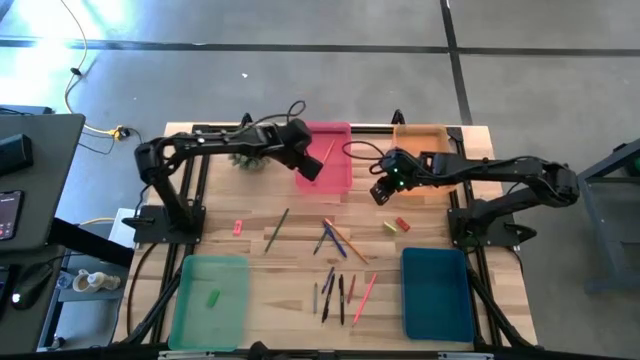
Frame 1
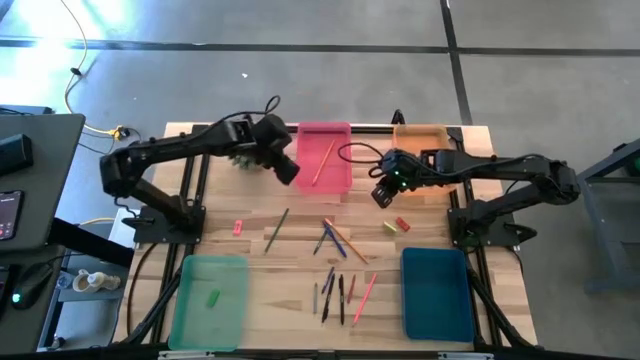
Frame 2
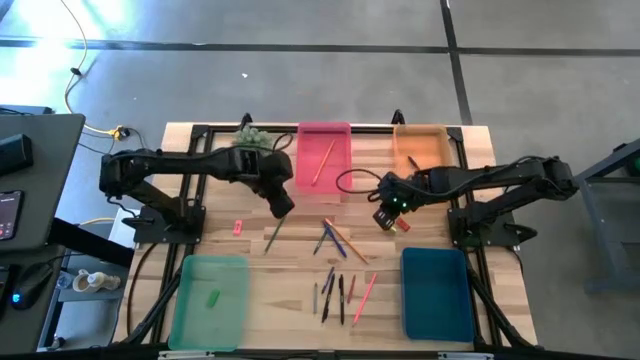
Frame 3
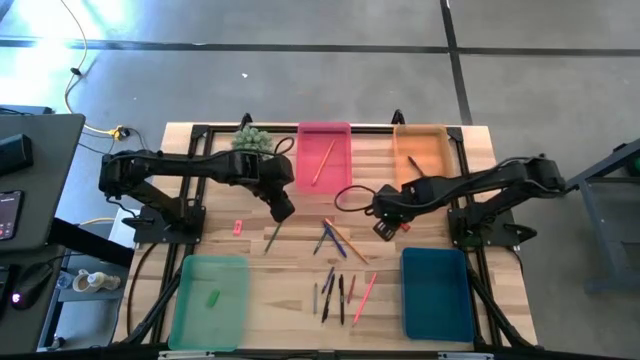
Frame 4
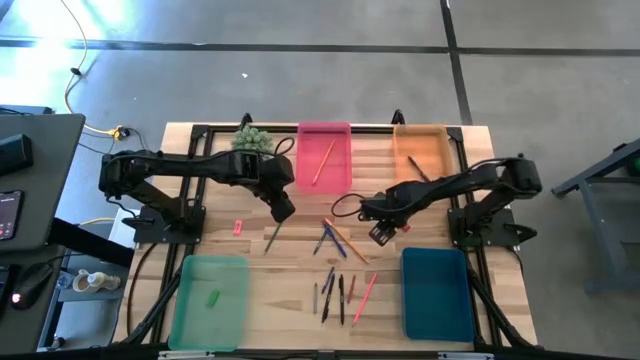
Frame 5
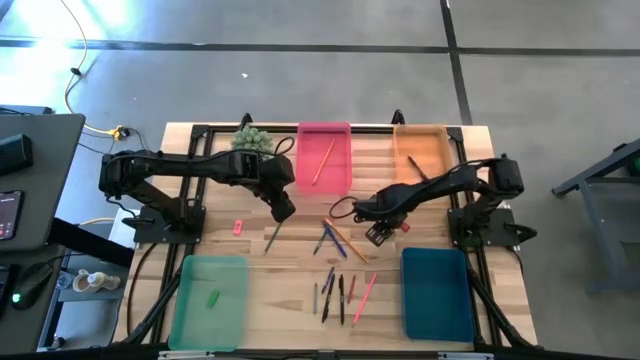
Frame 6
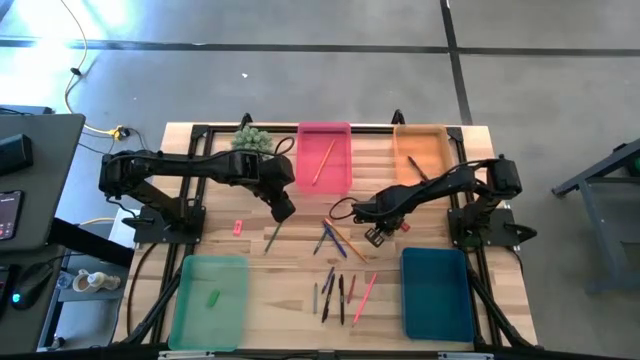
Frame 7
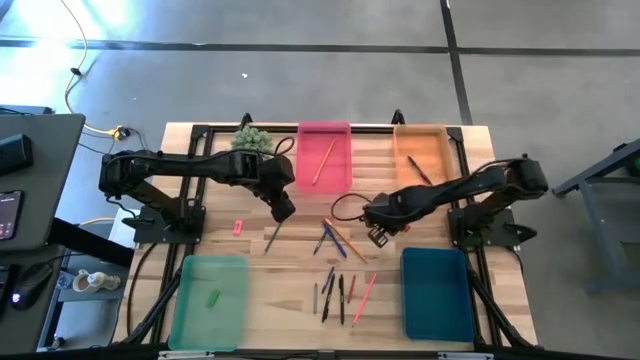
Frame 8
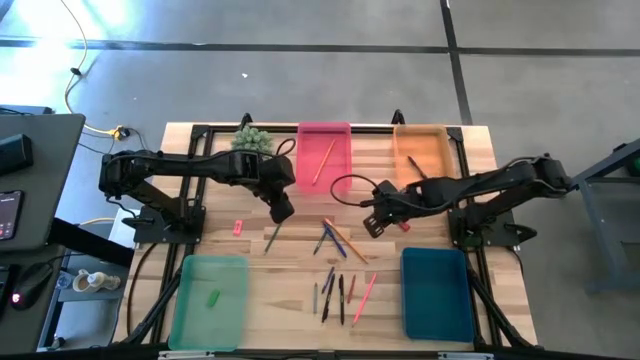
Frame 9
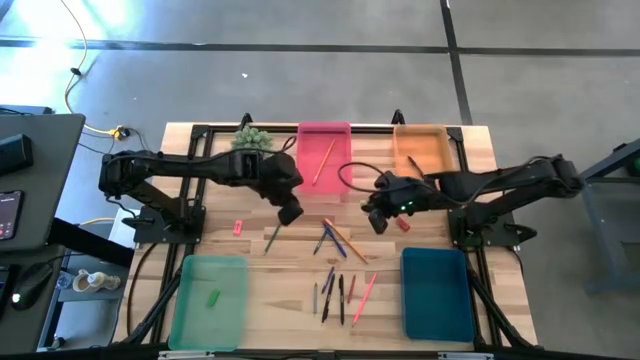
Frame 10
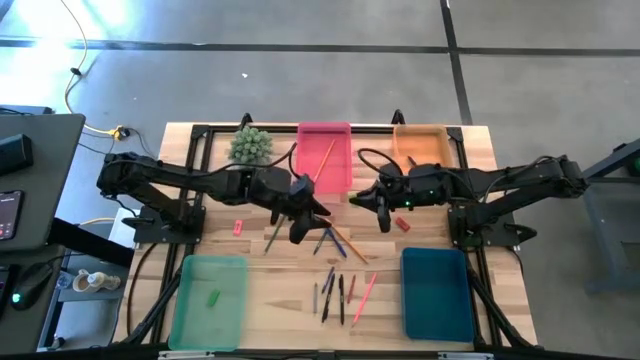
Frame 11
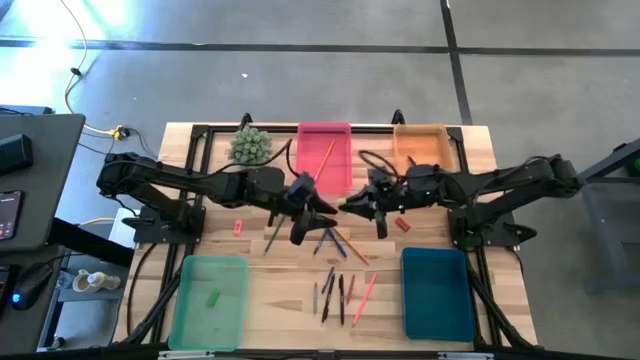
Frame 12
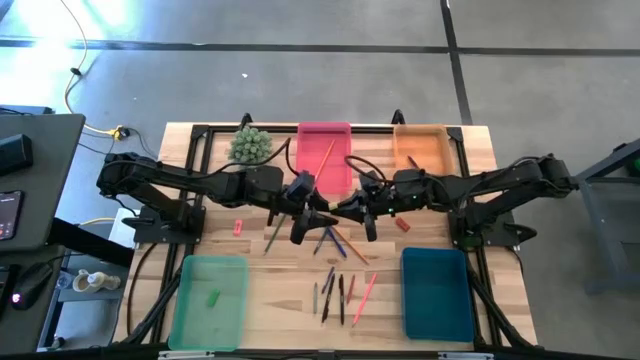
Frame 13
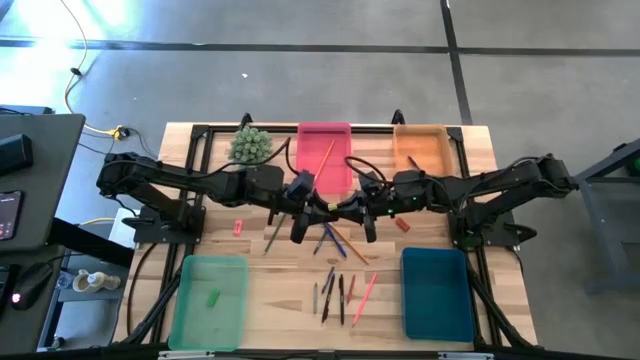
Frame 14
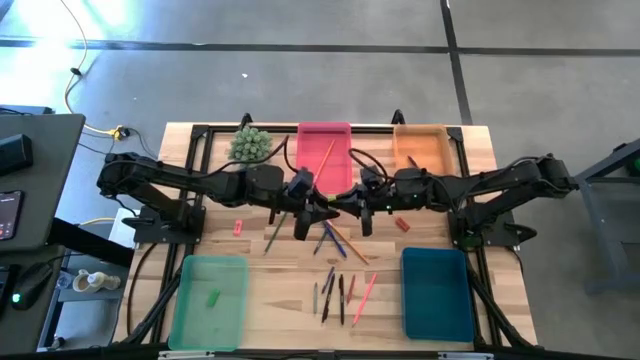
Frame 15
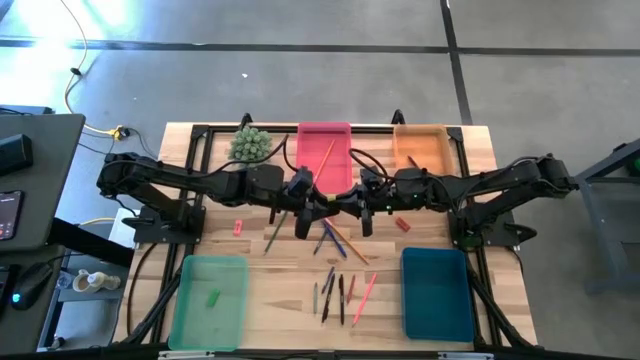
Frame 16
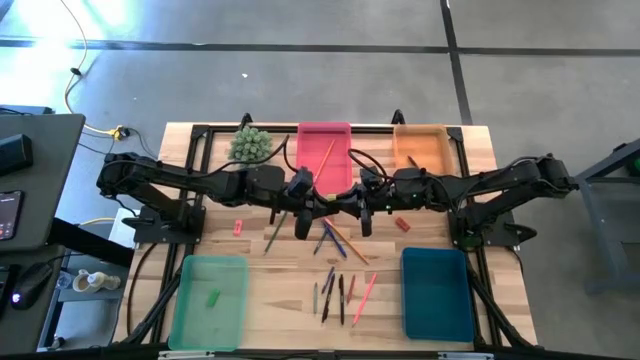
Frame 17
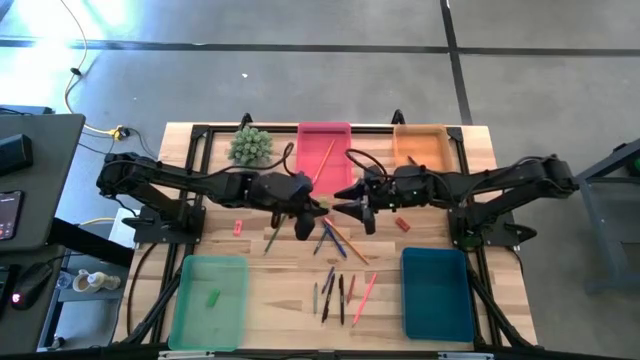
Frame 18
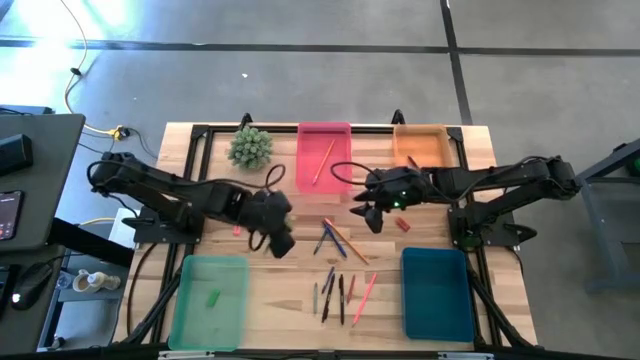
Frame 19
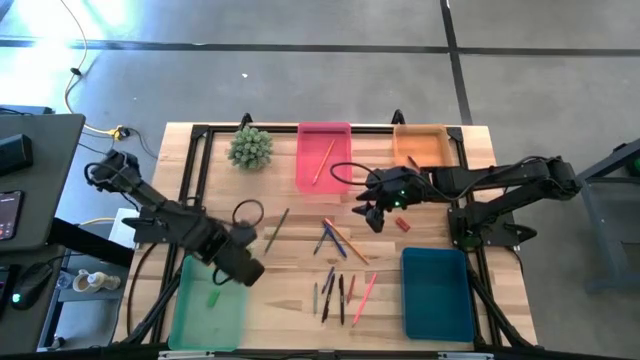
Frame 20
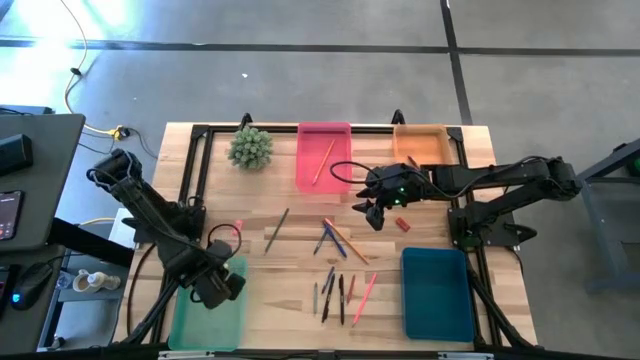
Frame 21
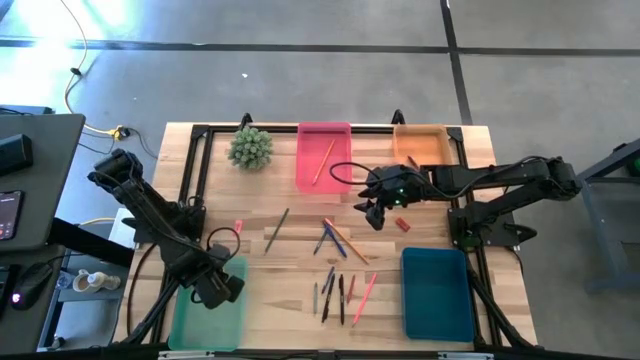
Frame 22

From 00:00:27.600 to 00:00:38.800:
Task: Sort crayons/erasers/pens/pencils in bins
Put the light green eraser into the light green bin

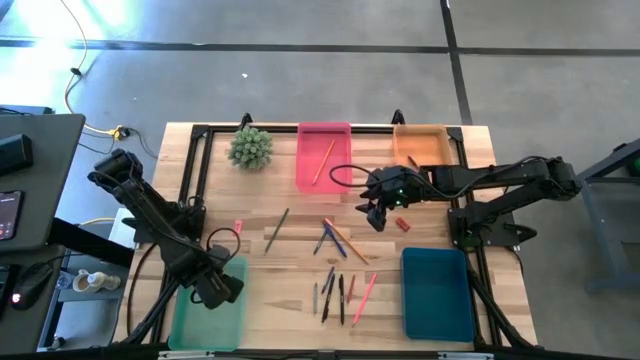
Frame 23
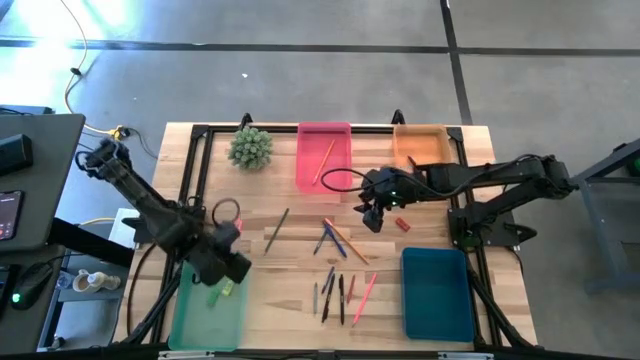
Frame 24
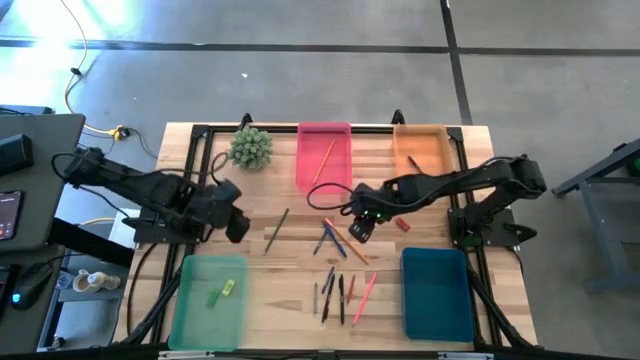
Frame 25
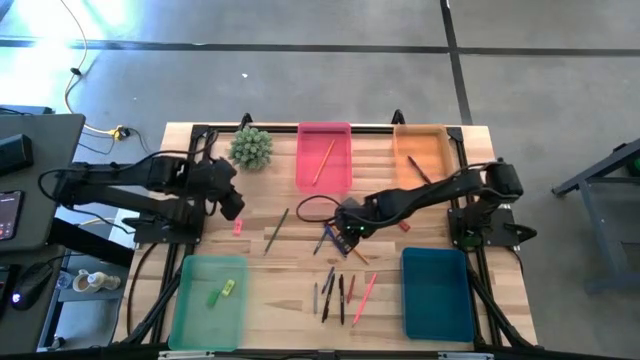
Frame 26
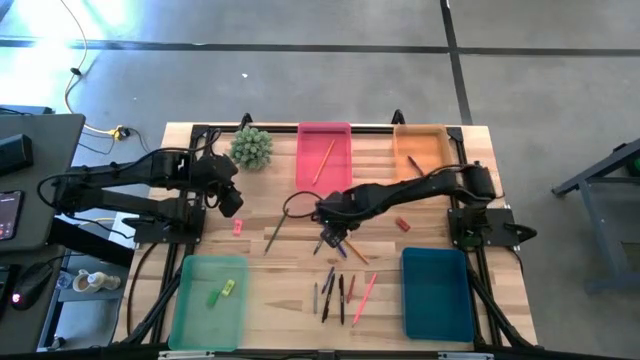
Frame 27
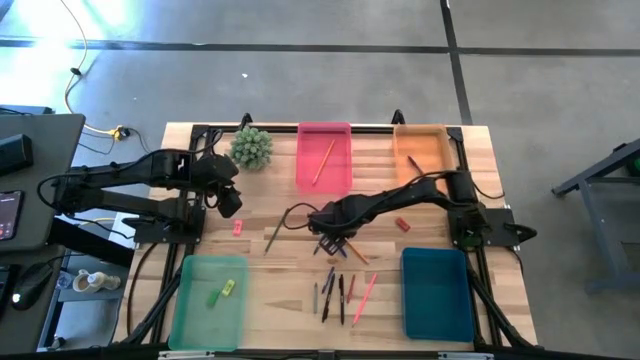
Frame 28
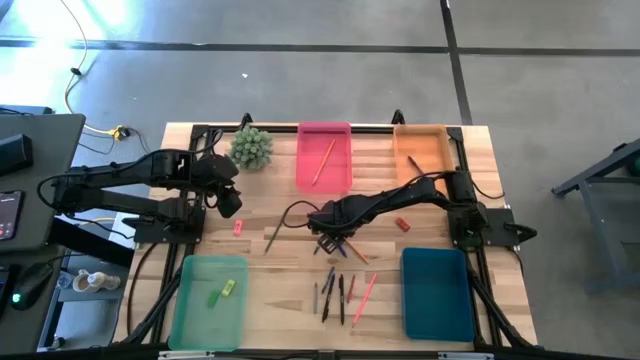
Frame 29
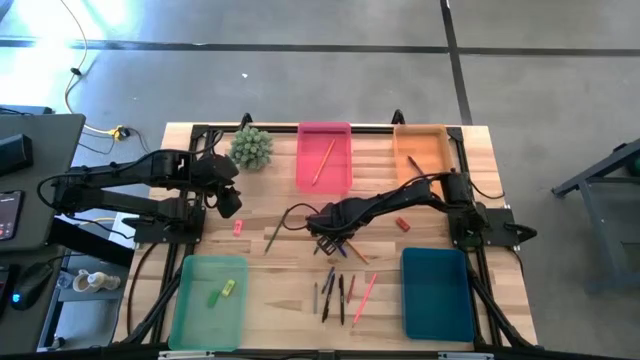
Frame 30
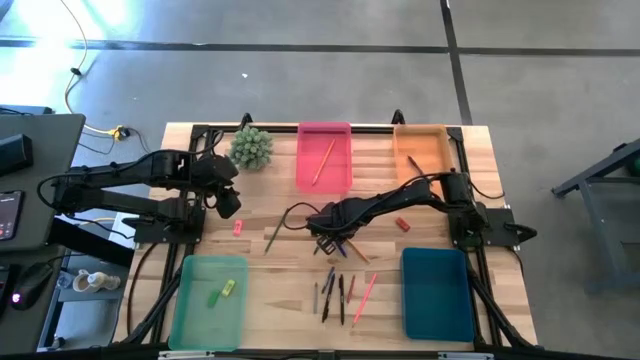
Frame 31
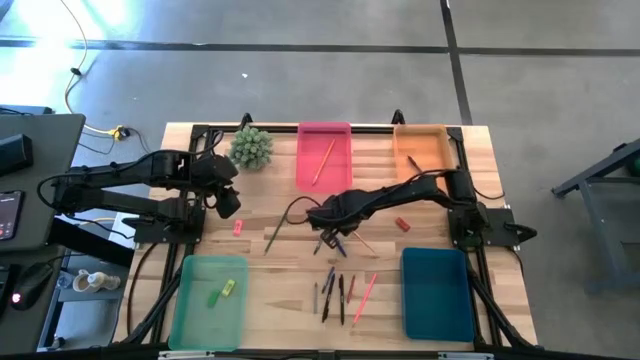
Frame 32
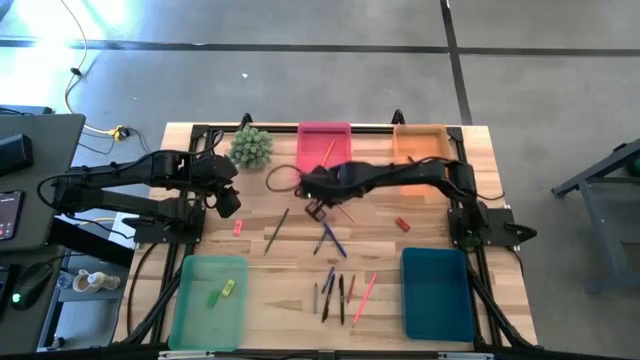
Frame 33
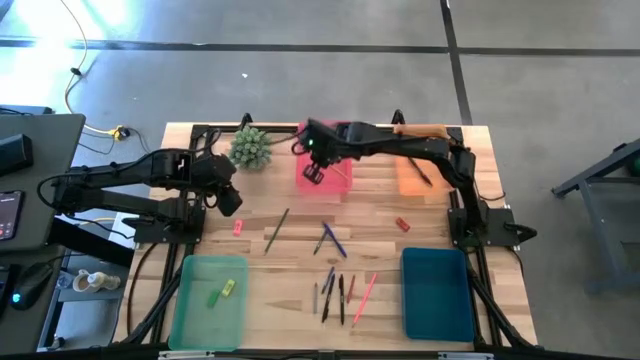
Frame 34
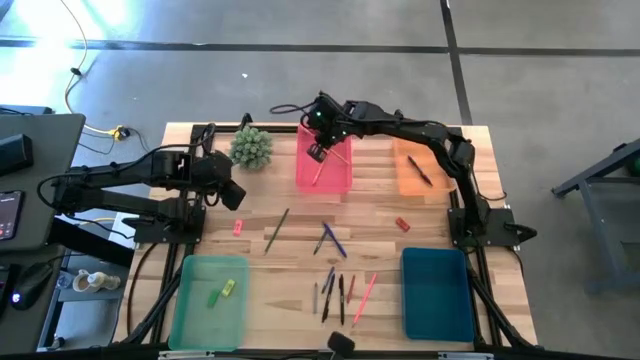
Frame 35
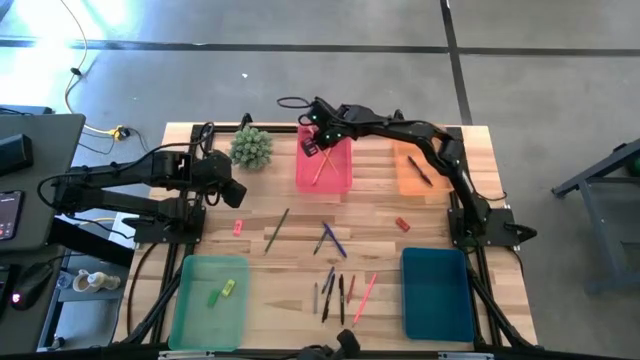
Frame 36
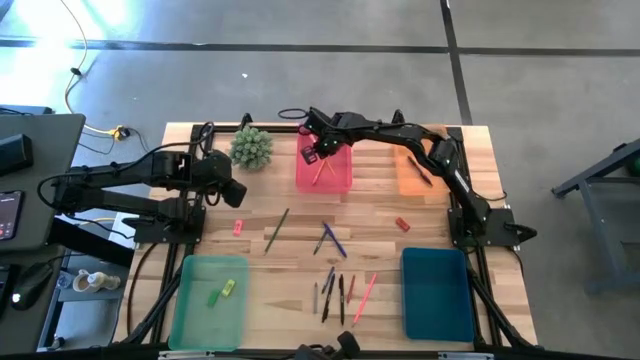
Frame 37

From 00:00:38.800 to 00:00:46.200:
Put the yellow pencil with the eraser into the red bin

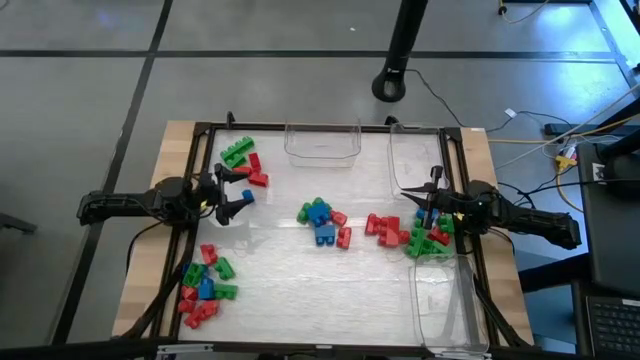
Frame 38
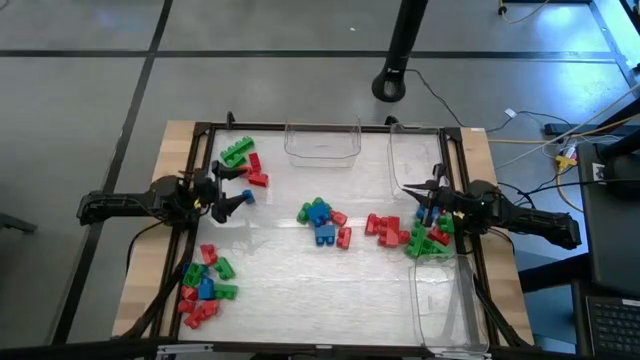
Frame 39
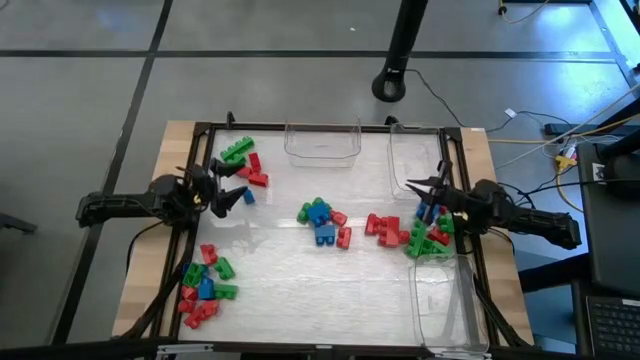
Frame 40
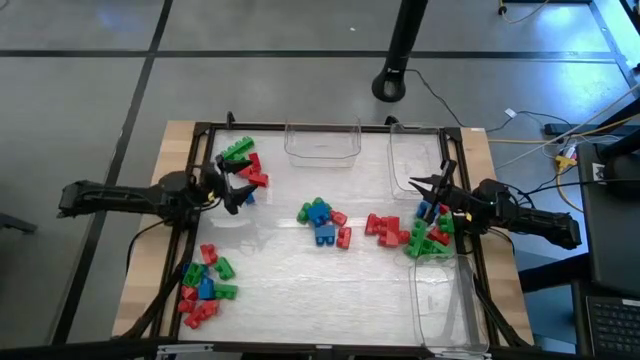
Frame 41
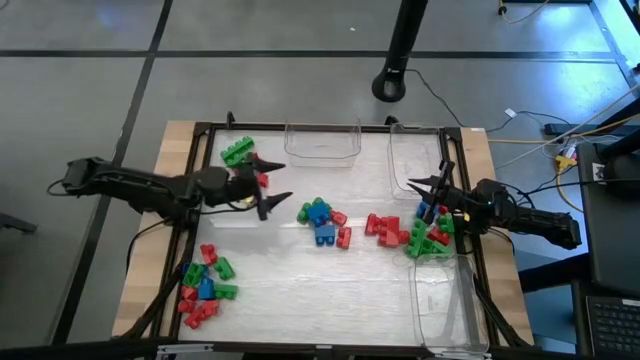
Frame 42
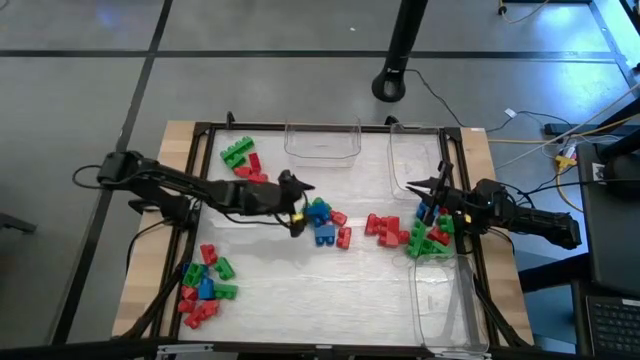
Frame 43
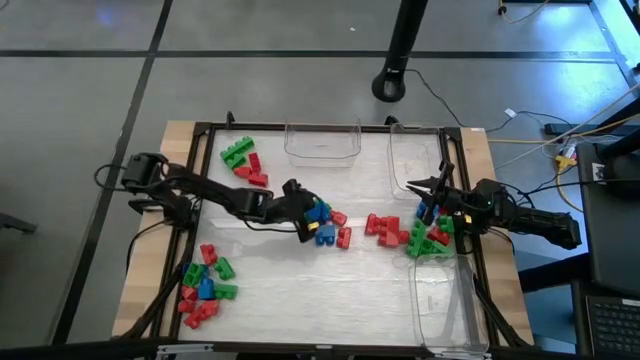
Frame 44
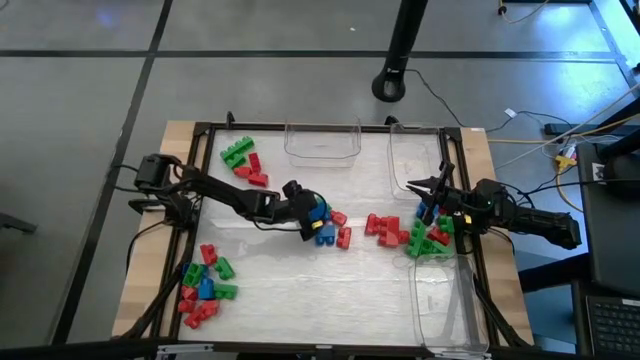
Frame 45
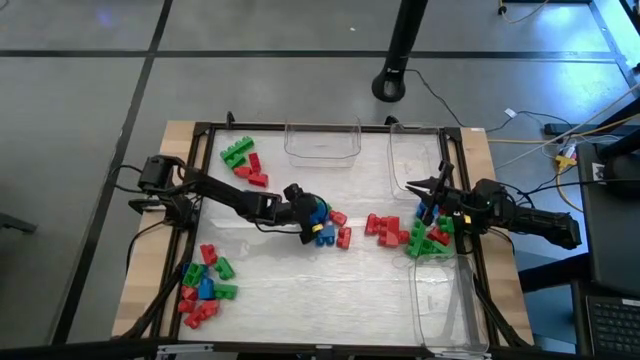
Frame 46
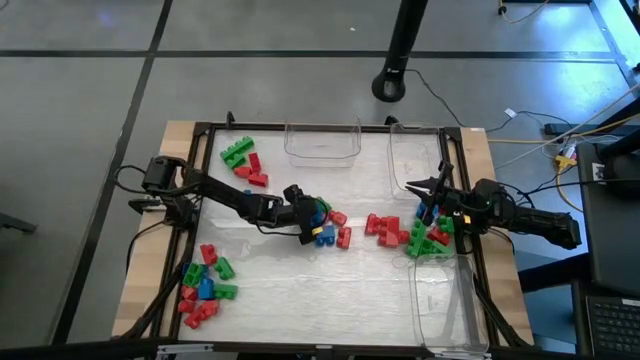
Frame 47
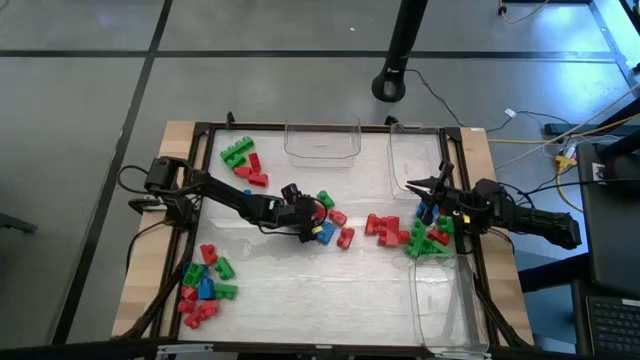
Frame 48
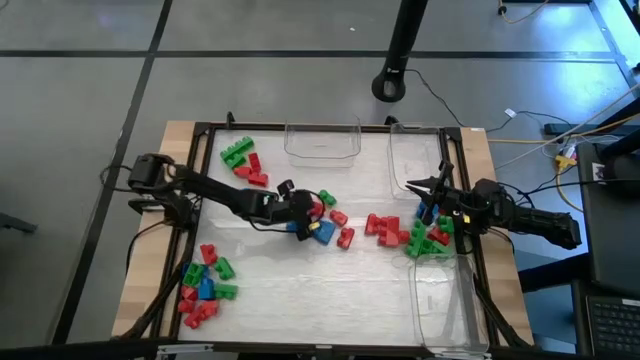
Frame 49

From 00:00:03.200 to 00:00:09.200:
Task: Sort blocks
Put the red game piece into the top left transparent bin
